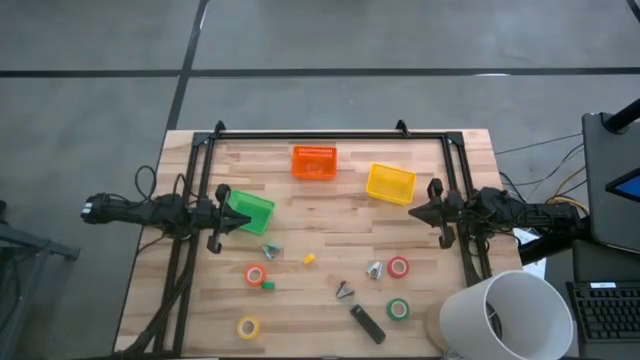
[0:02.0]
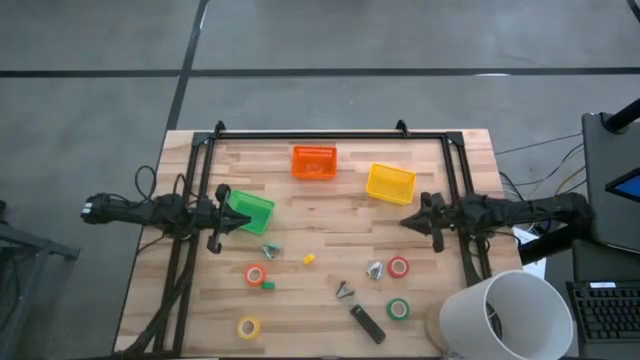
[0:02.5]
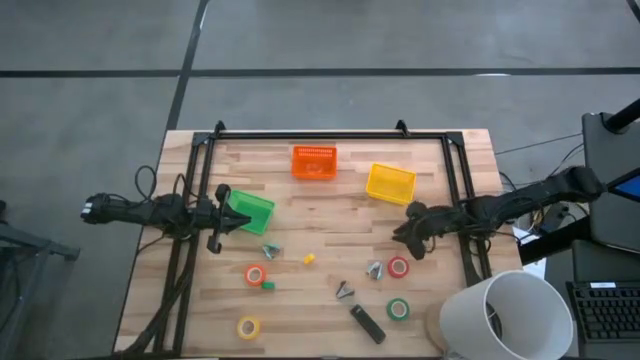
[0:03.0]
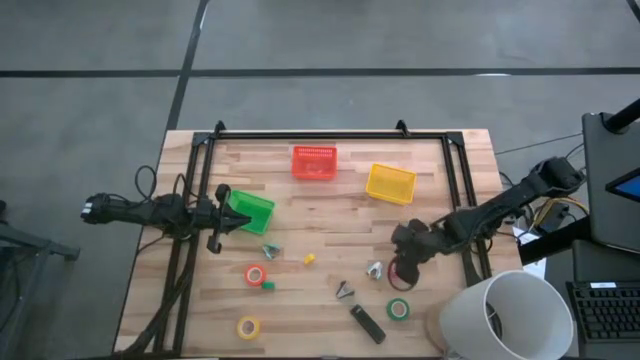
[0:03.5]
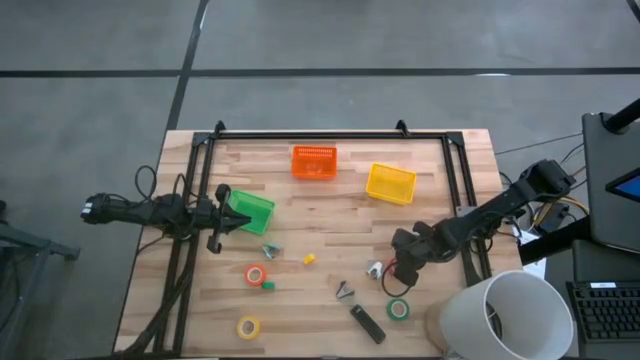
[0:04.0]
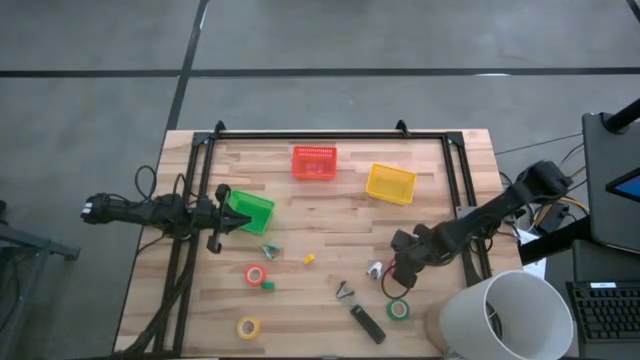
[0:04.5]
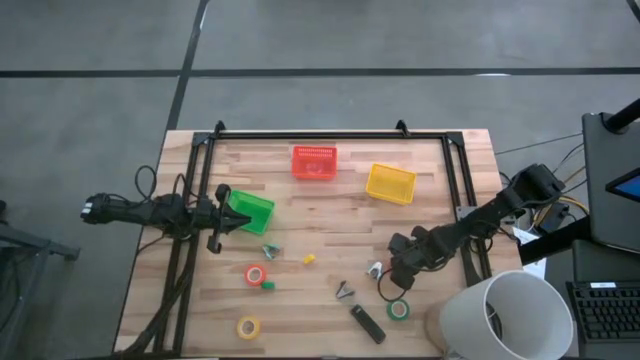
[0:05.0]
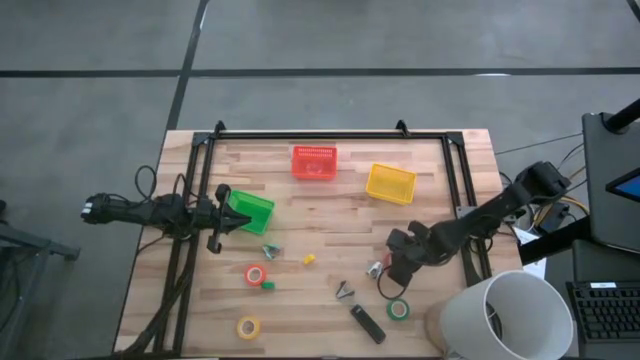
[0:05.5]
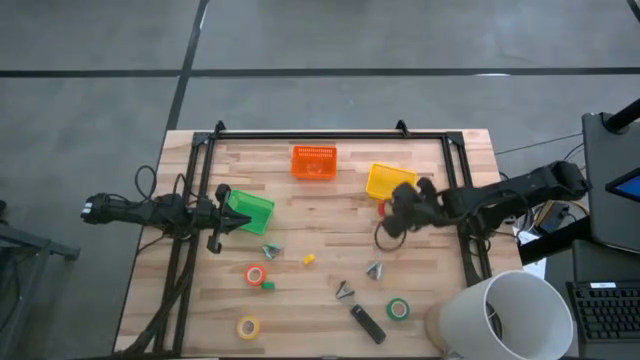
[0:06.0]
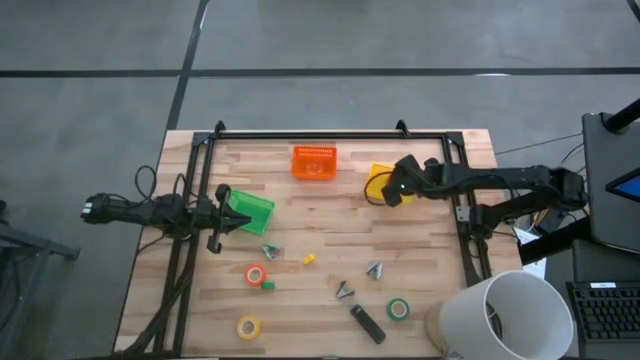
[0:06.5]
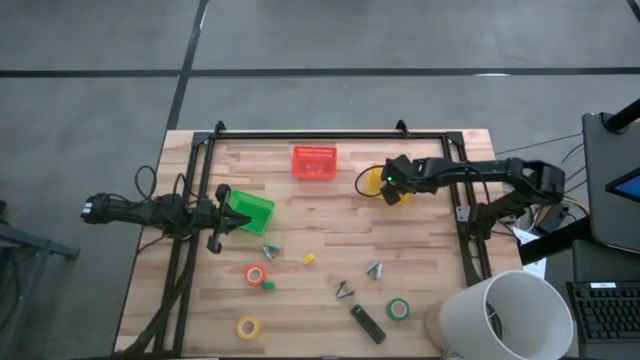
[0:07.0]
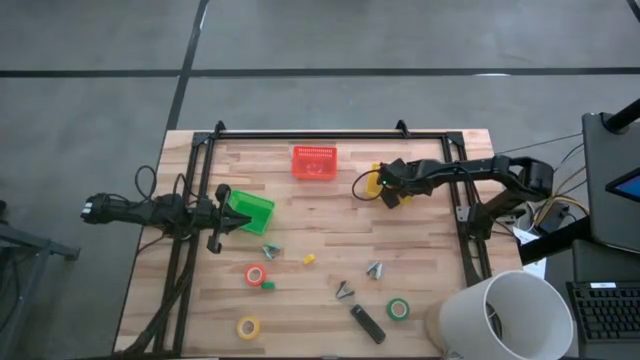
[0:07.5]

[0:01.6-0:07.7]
Task: Pick and place Stapler, Stapler remover, tape
Put the red tape into the yellow basket

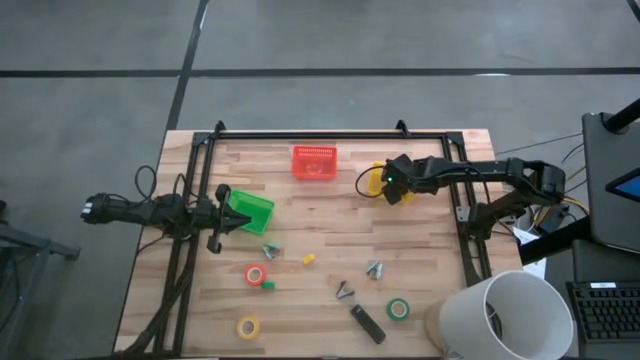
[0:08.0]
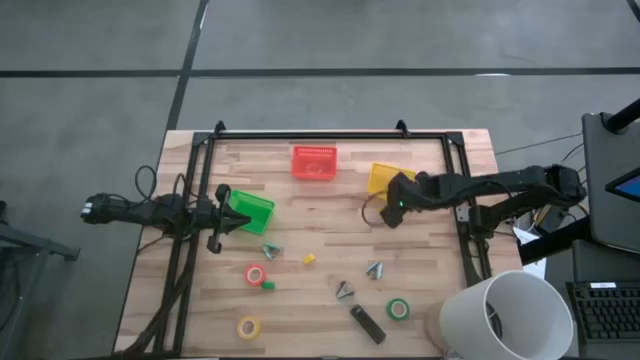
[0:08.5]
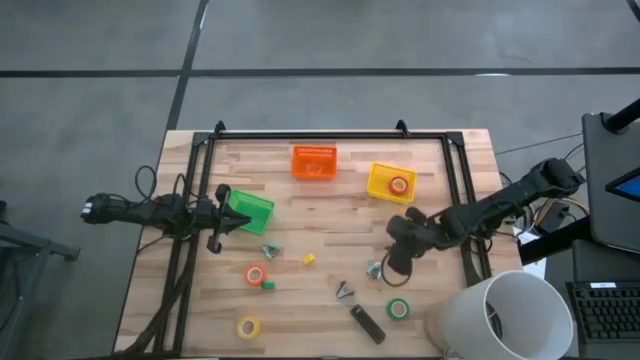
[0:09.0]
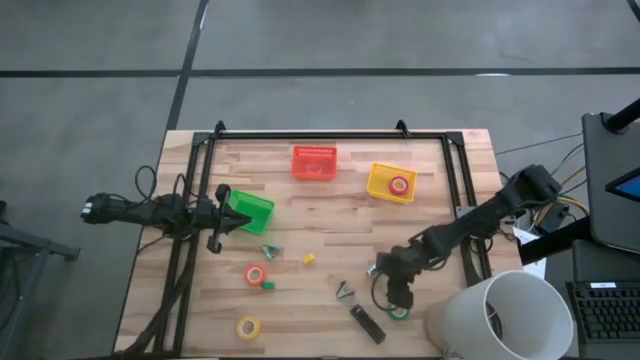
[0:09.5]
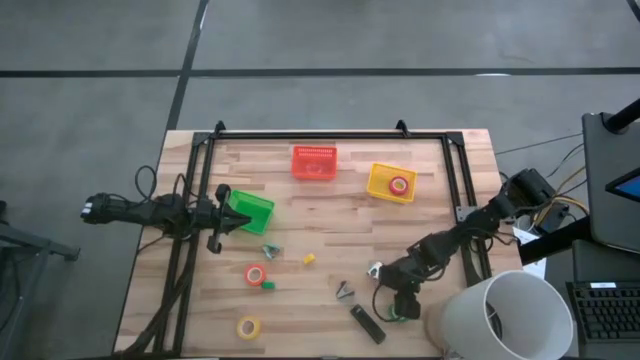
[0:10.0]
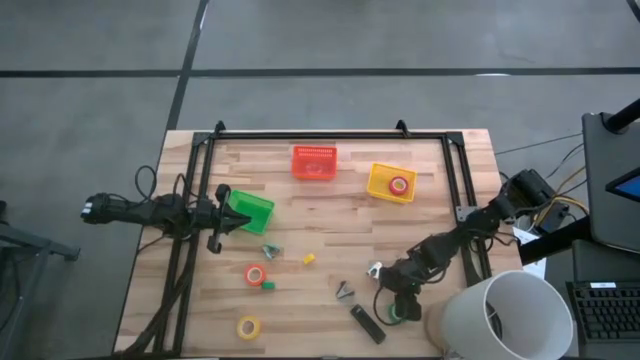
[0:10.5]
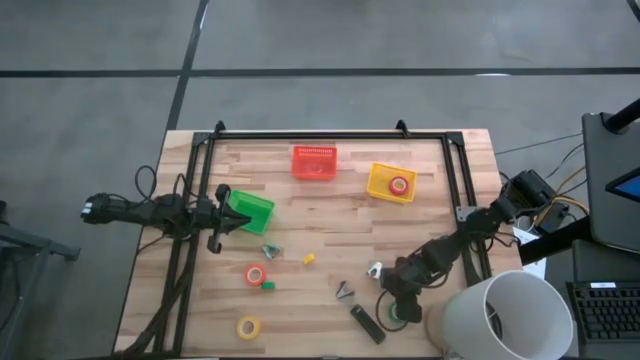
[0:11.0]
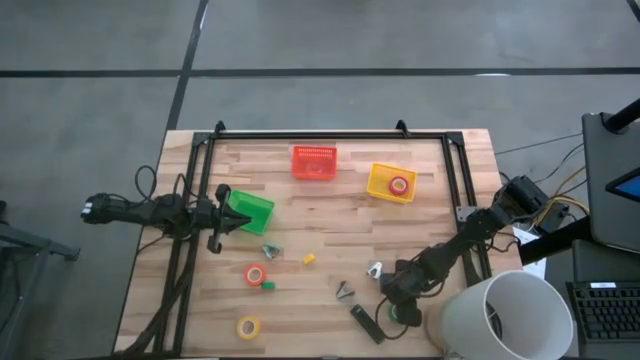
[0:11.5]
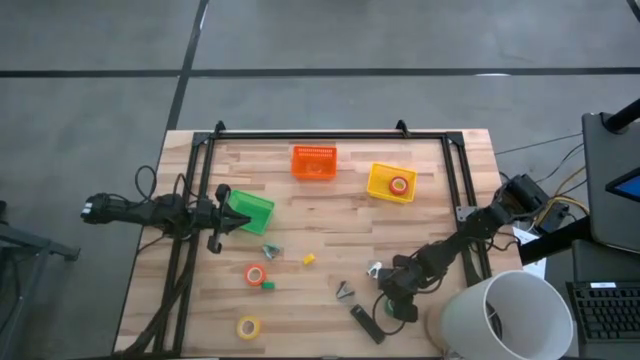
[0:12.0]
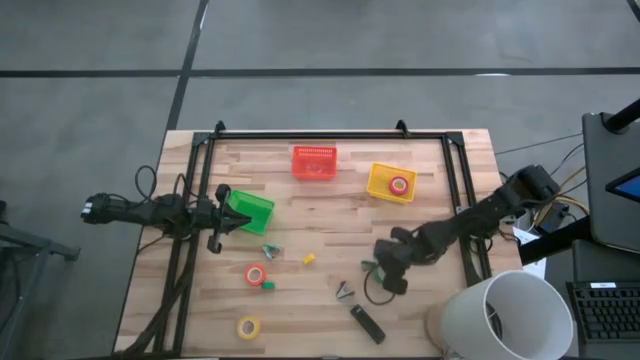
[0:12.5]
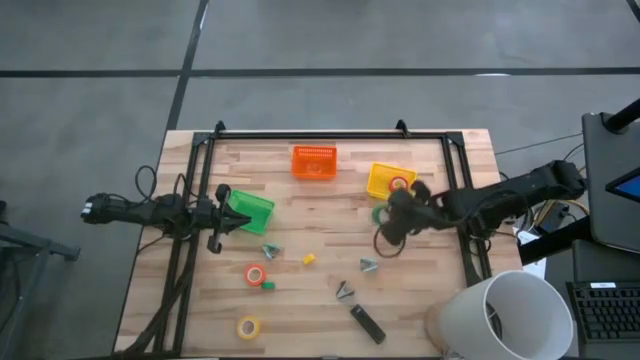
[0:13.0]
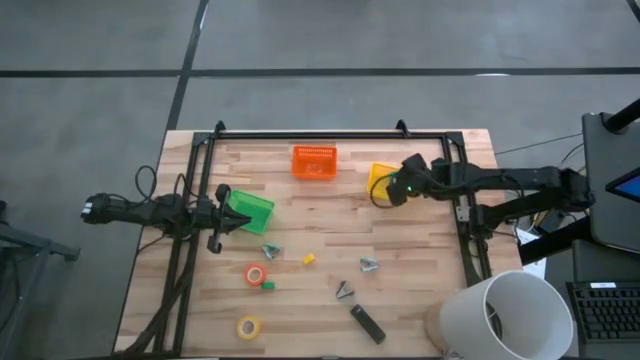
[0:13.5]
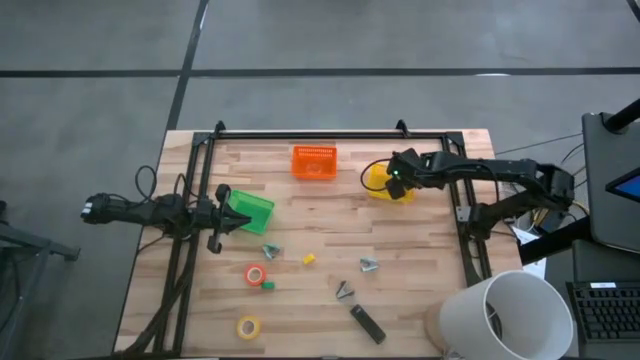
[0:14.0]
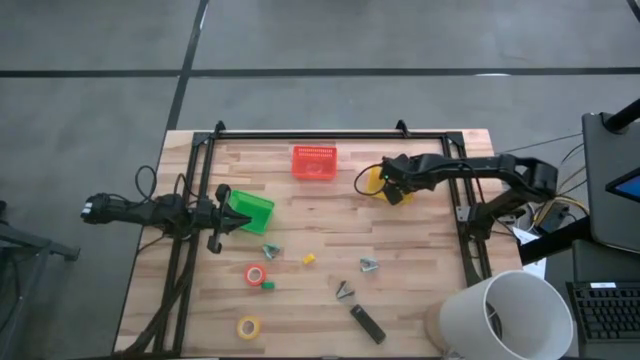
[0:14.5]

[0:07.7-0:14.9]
Put the green tape into the yellow basket

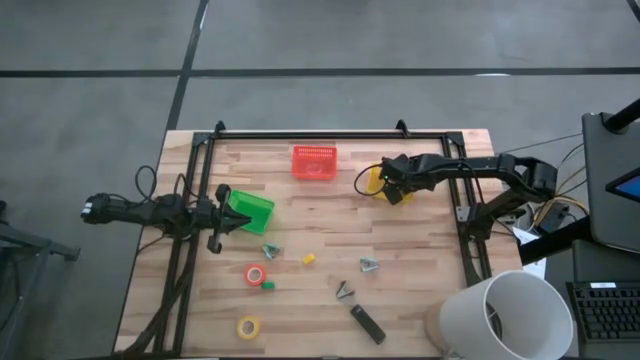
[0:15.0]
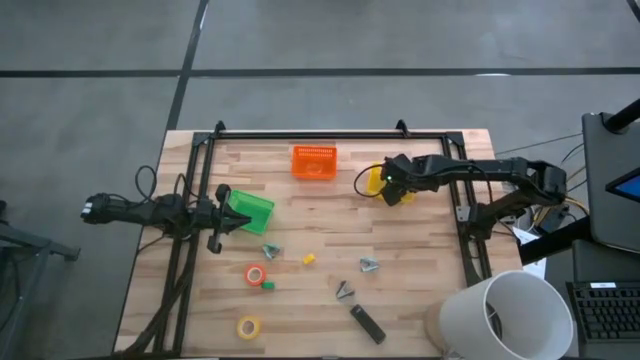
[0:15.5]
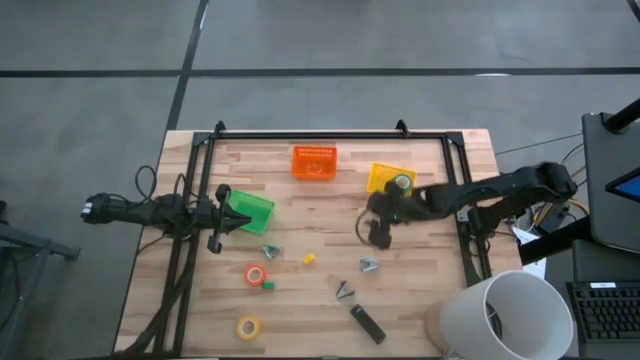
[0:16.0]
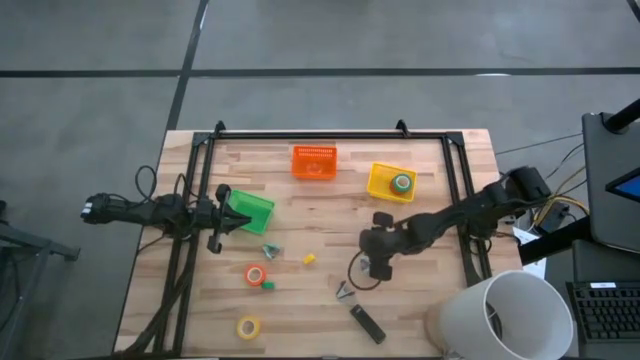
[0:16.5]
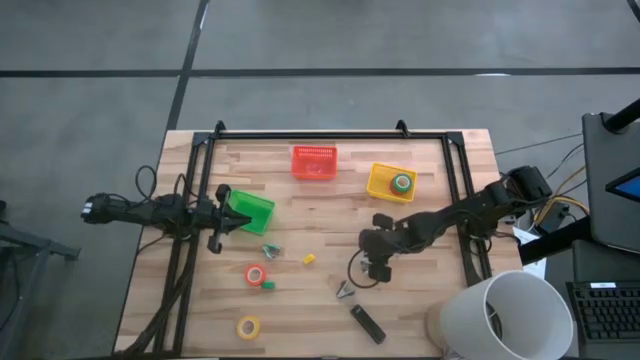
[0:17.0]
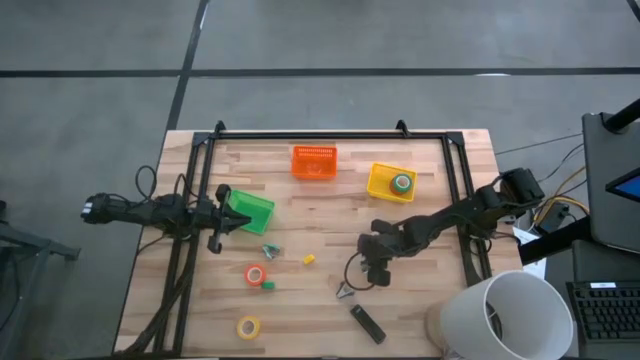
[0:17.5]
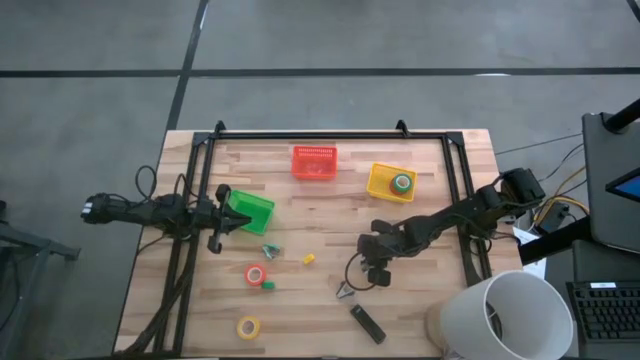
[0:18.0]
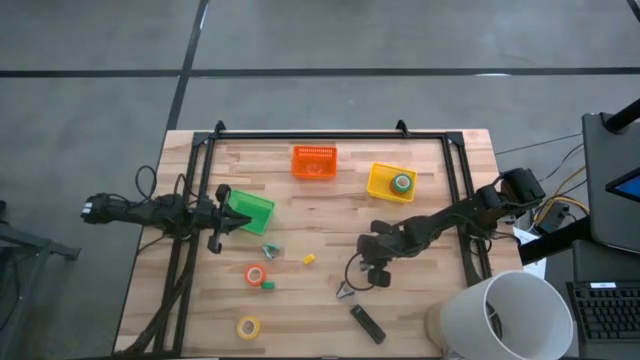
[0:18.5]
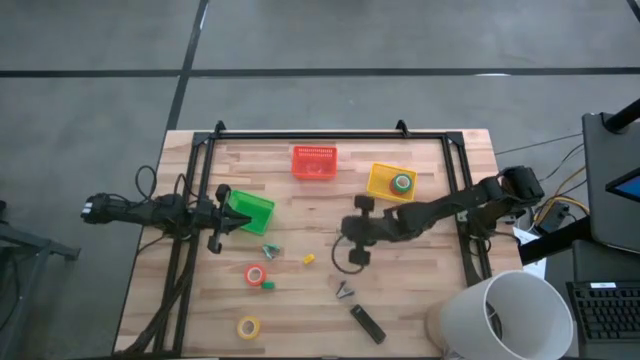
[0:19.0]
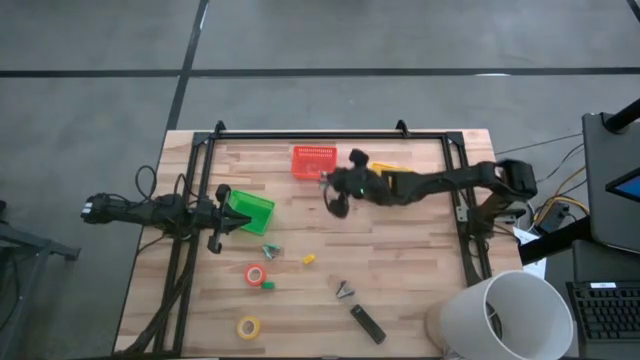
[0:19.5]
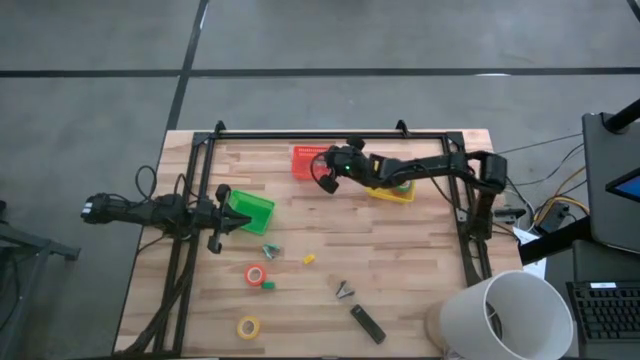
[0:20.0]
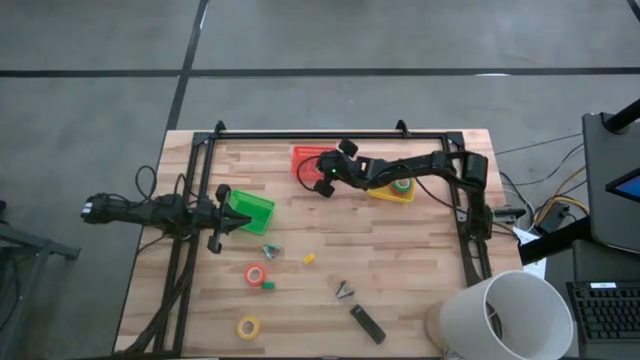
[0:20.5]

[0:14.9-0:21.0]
Put the right light blue staple remover into the orange basket

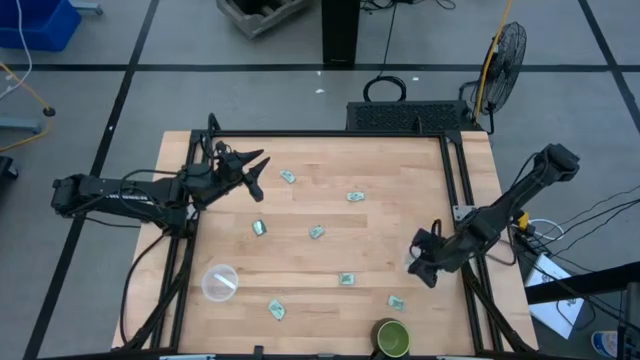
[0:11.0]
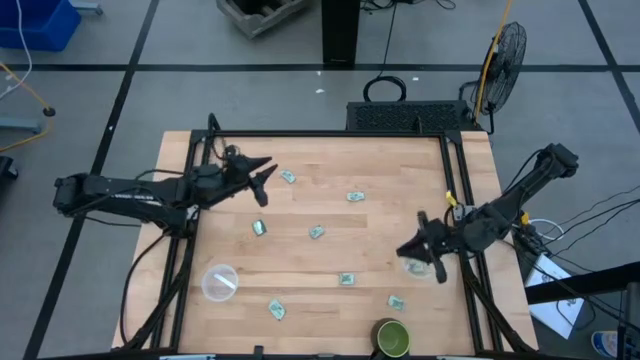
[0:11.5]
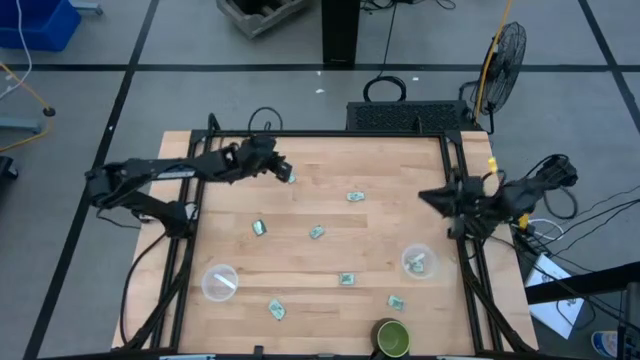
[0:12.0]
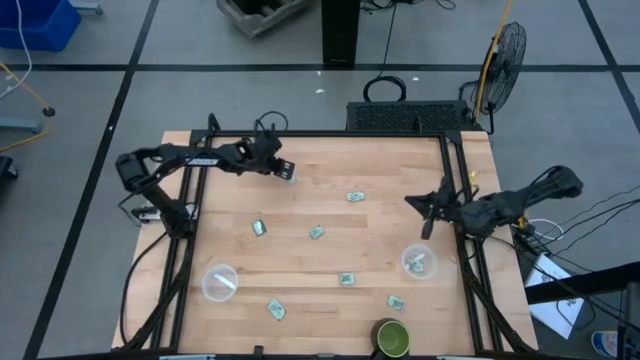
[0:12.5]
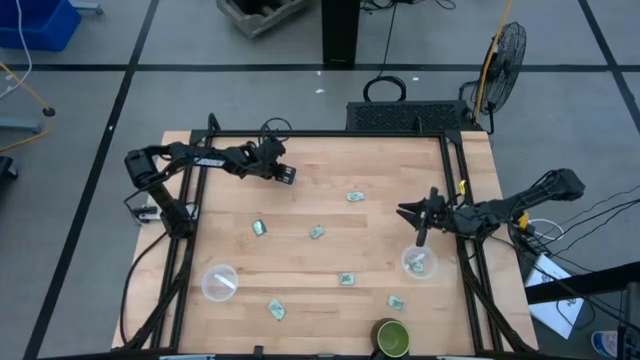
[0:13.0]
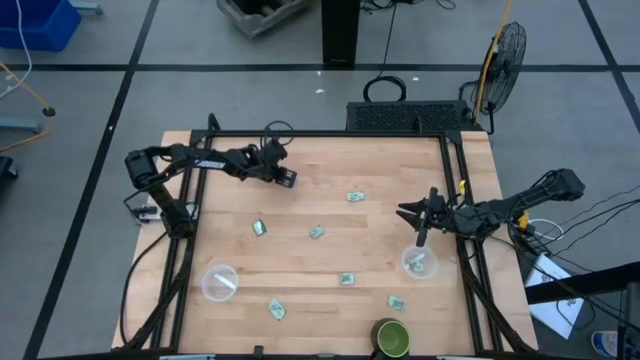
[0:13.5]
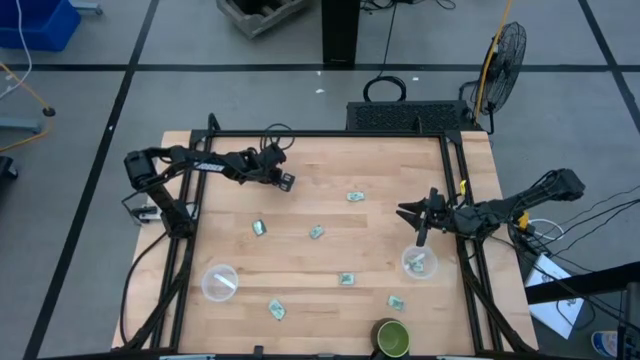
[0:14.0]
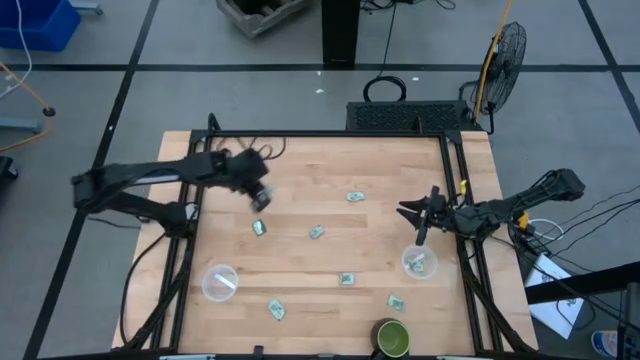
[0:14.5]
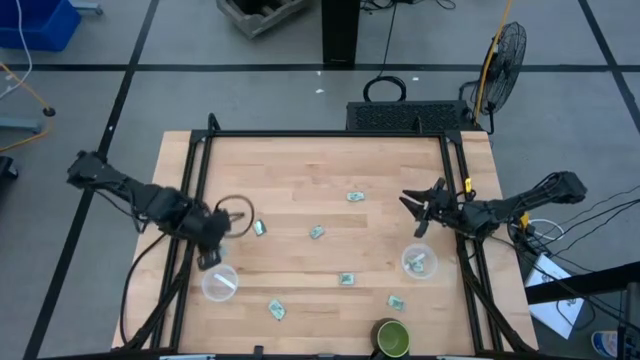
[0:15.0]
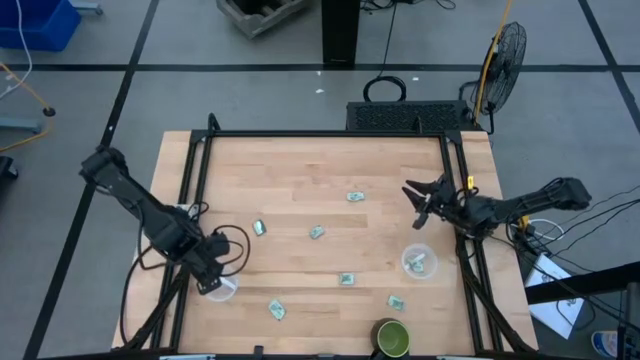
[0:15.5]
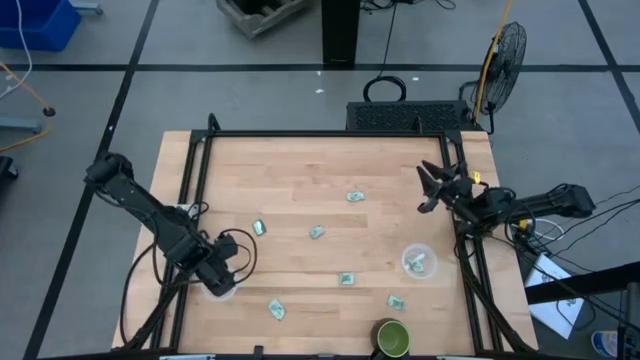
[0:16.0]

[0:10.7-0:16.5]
Task: Pick and place Stevia / Truvia into bins
Put the Stevia packet into the left transparent plastic container
